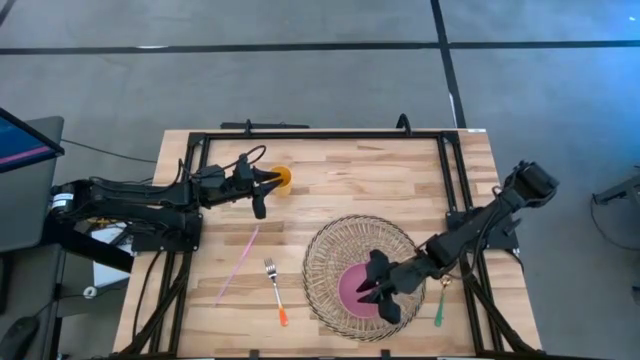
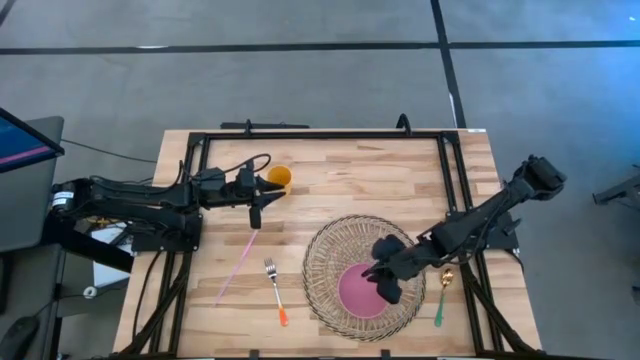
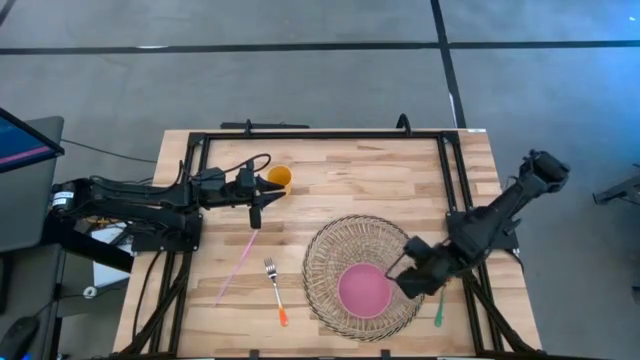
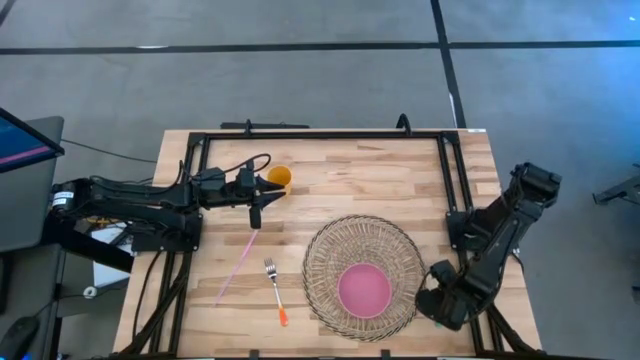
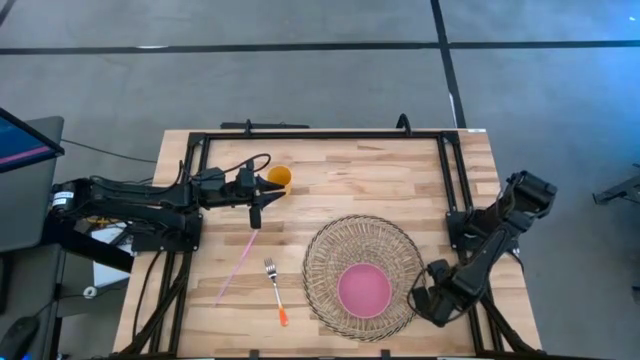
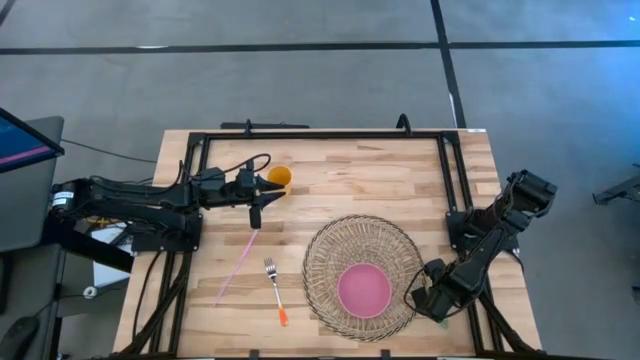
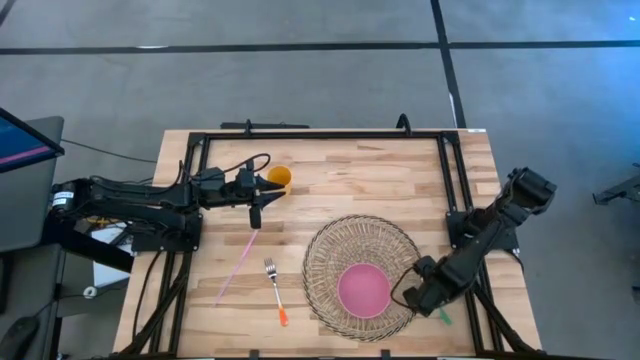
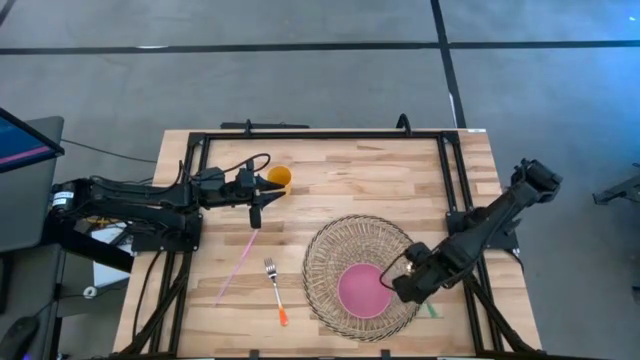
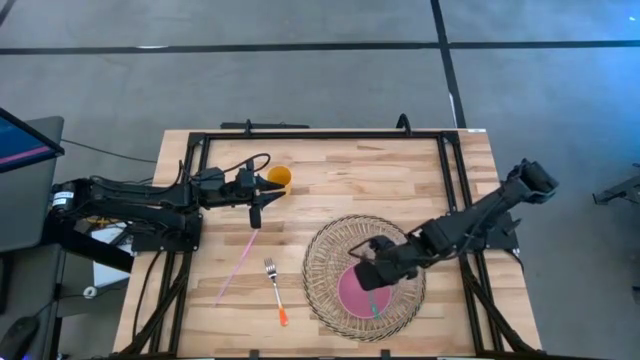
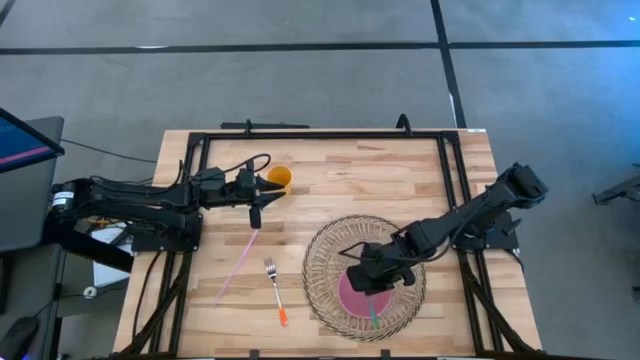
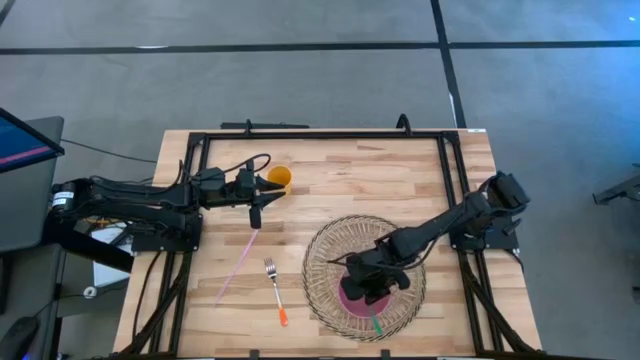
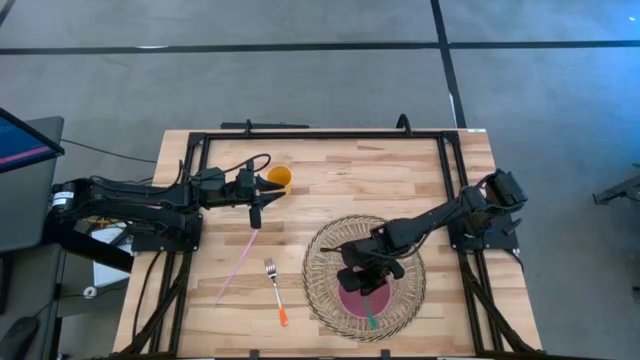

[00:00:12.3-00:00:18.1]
Task: Pick & Place Utensil
Put the green spoon into the pink bowl

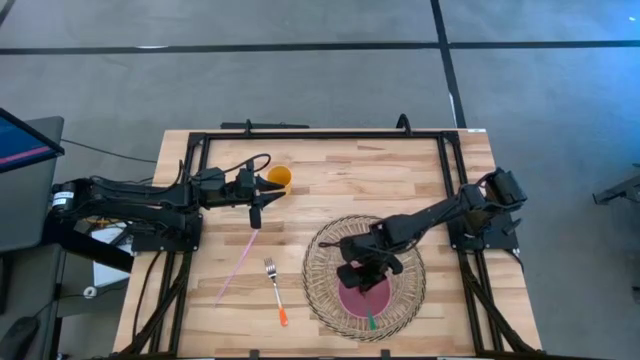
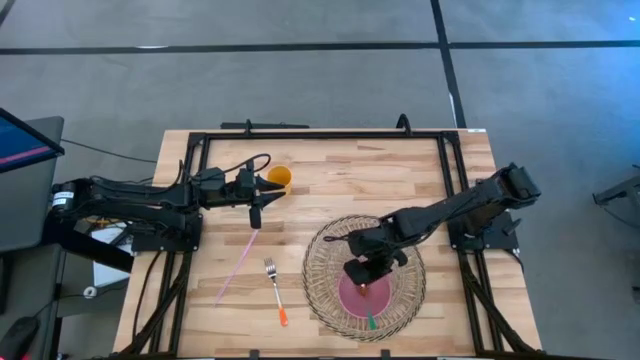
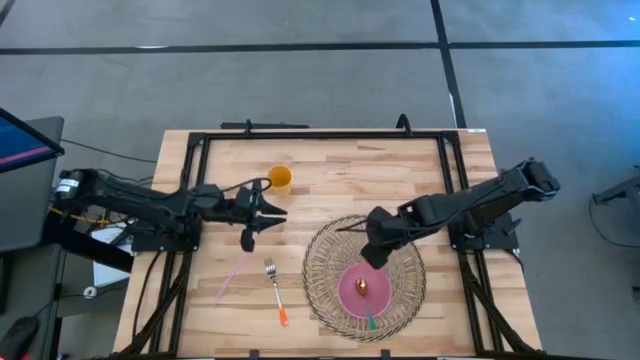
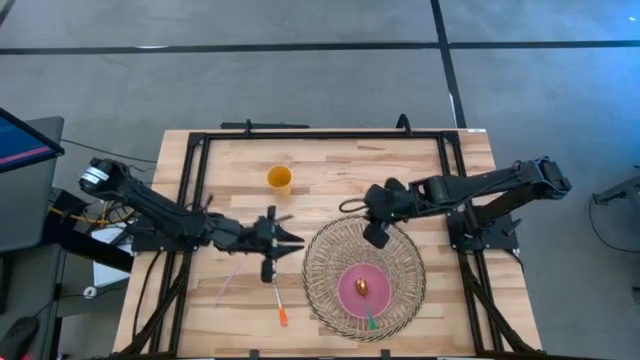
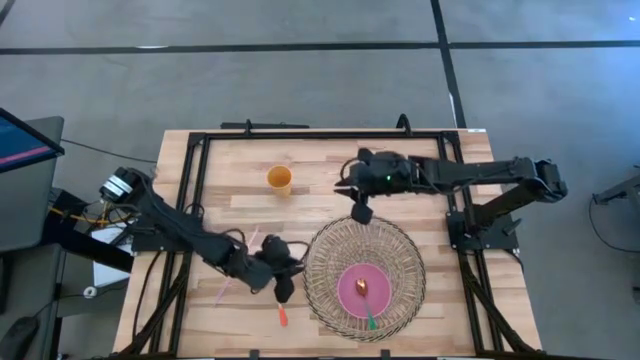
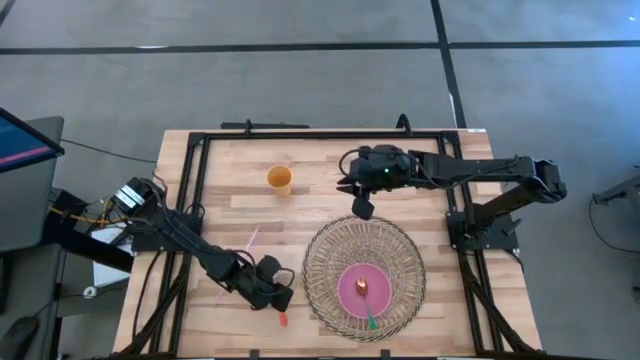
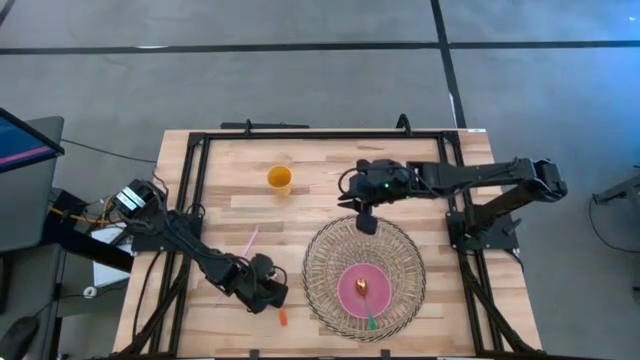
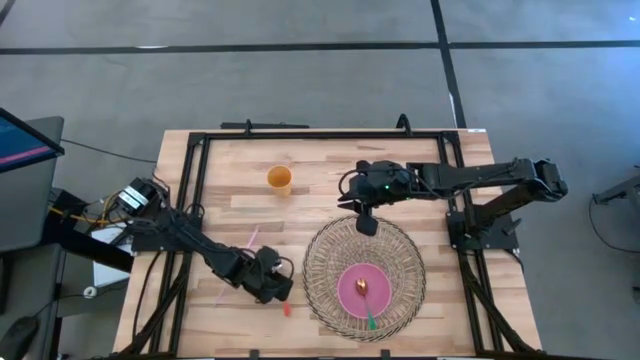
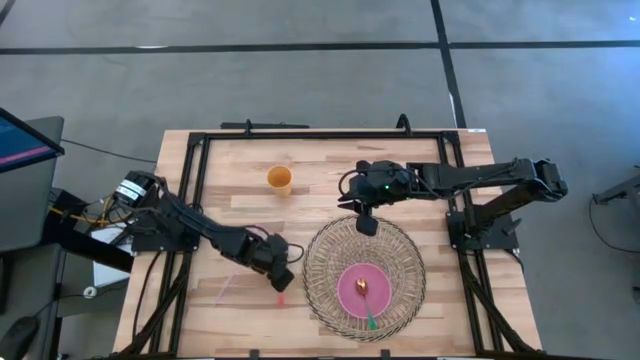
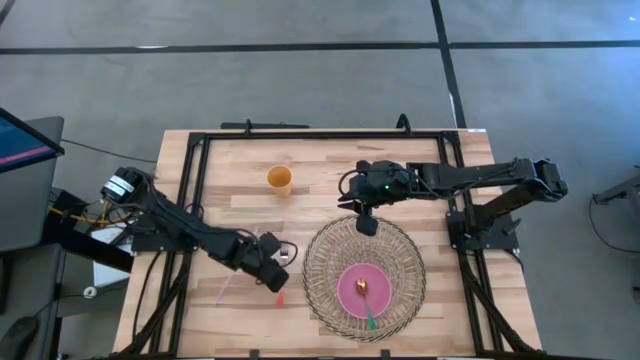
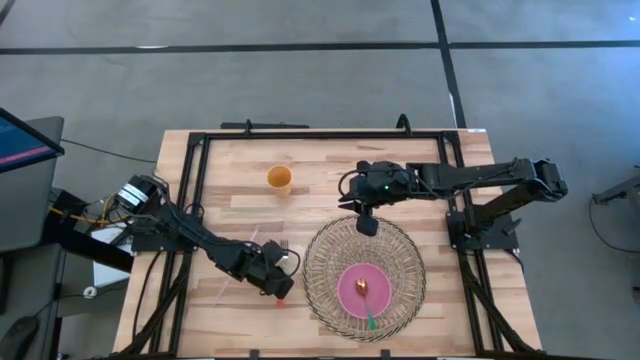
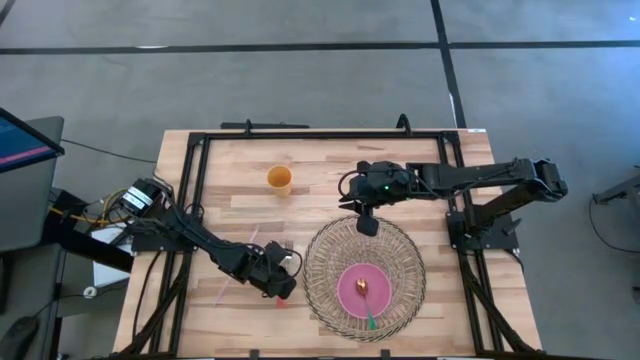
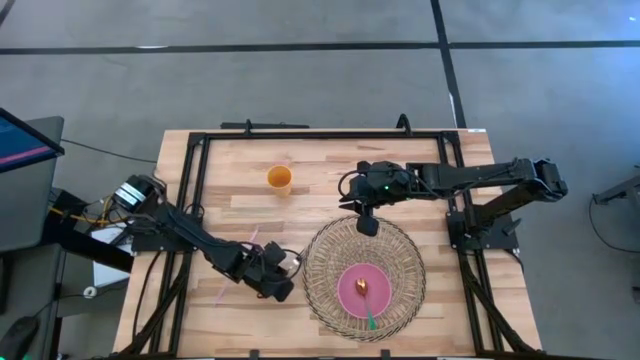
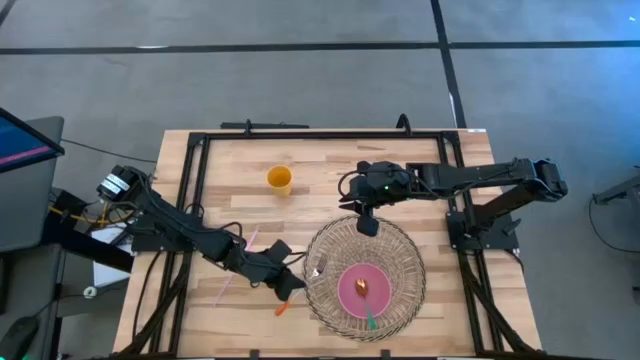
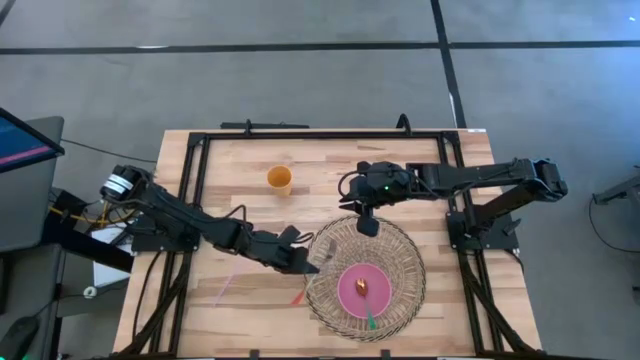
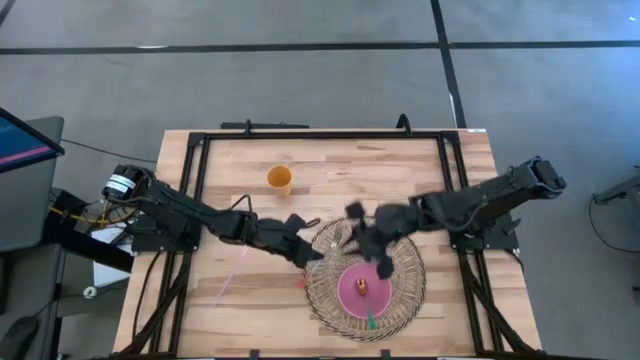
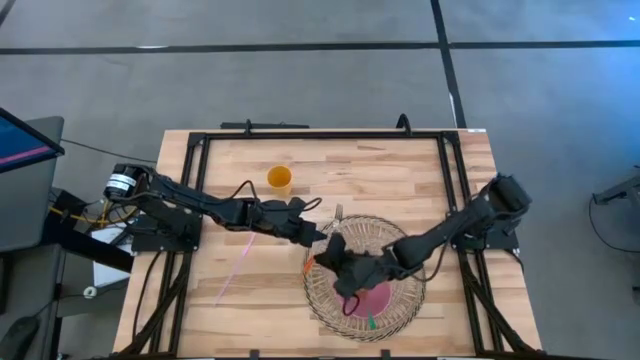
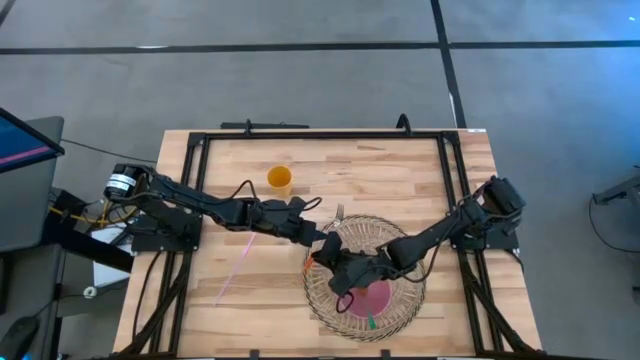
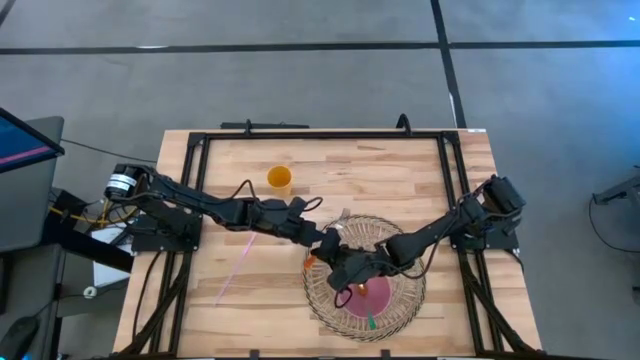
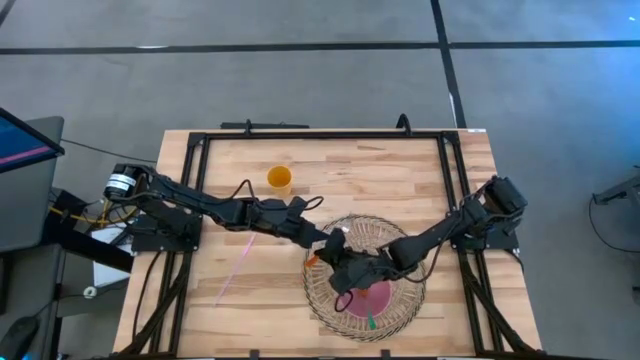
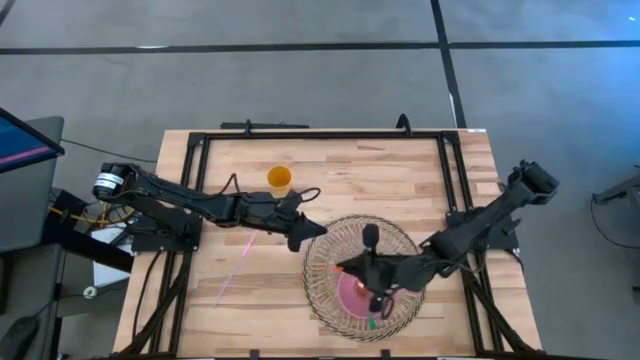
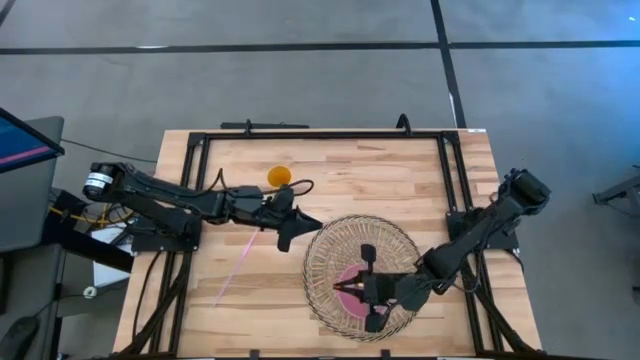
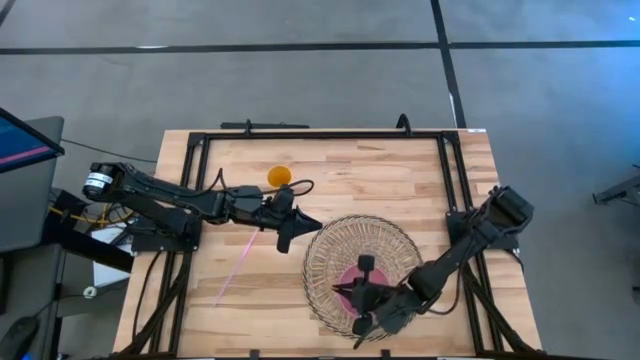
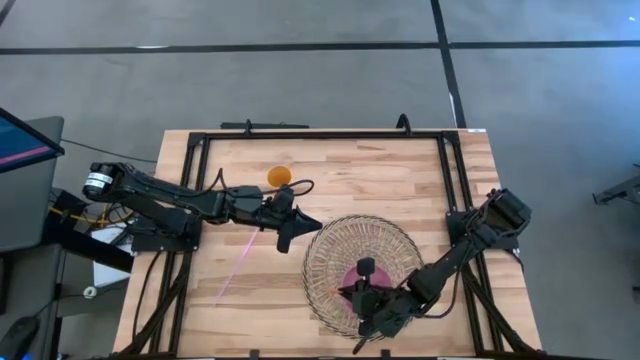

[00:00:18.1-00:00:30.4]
Put the white and orange fork into the pink bowl

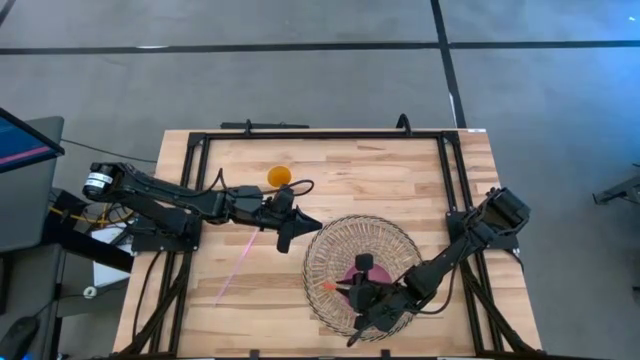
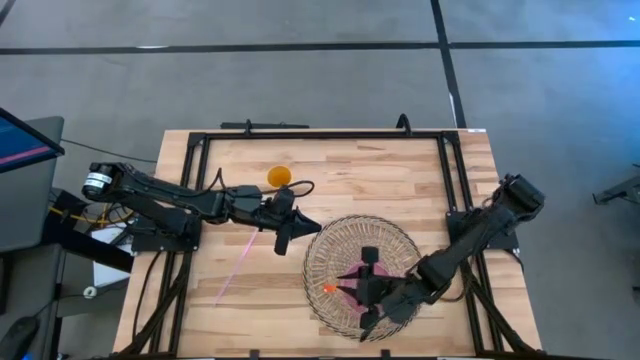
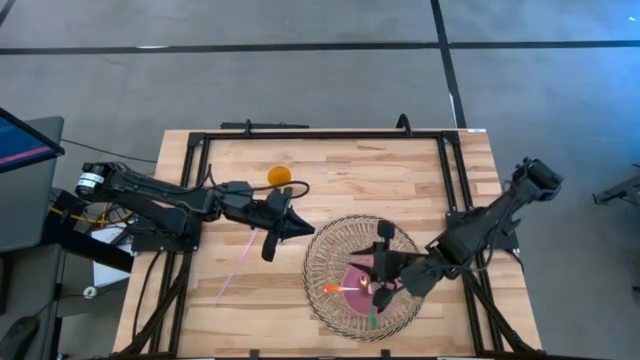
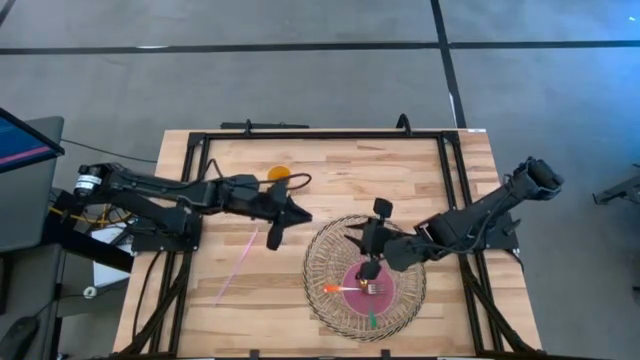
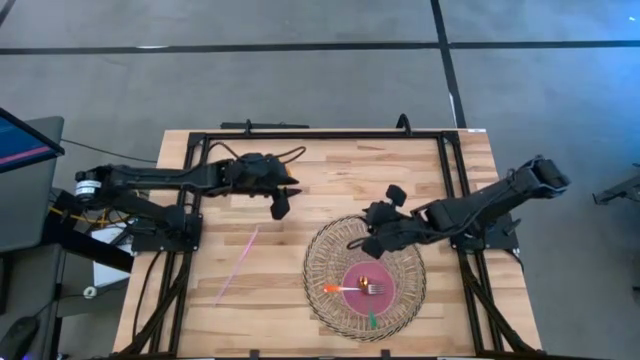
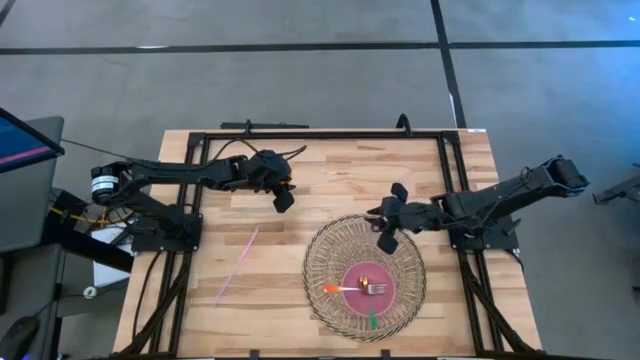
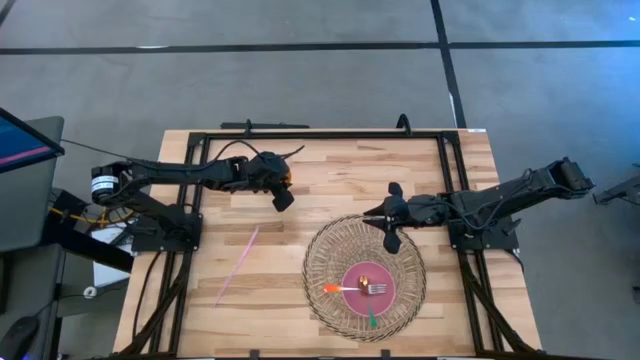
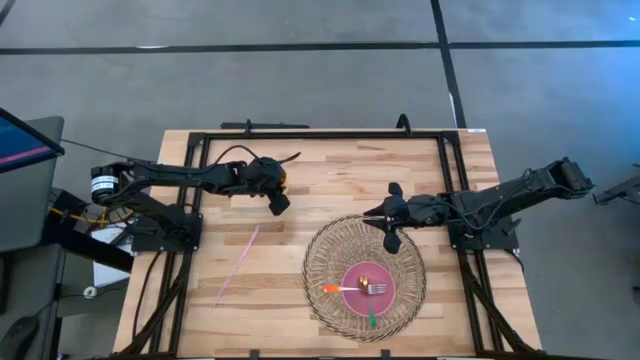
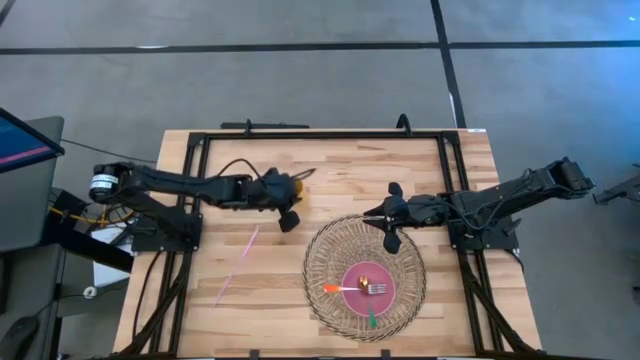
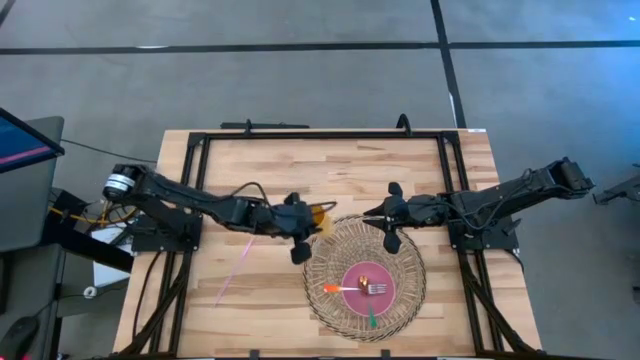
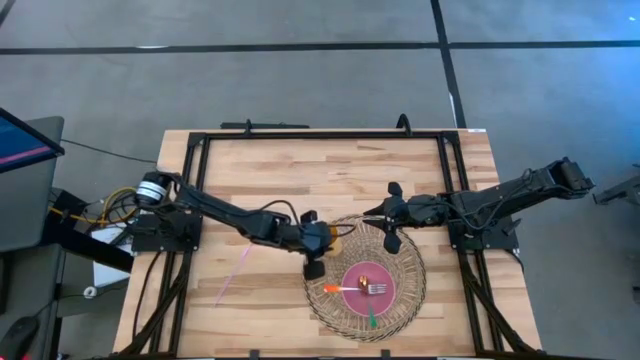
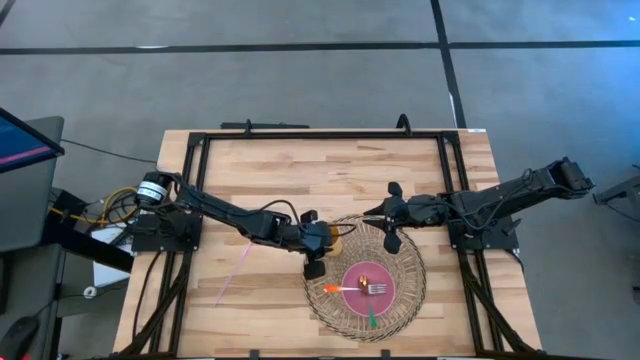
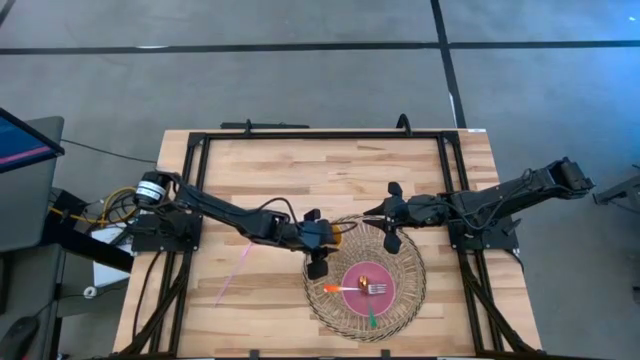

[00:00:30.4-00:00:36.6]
Put the yellow cup on the top left of the pink bowl
